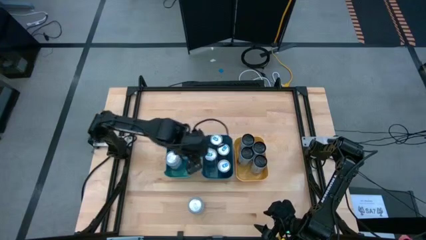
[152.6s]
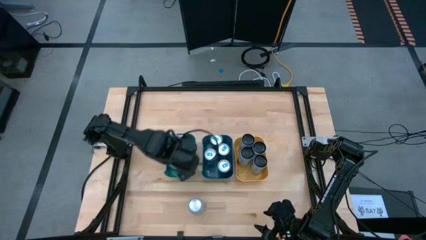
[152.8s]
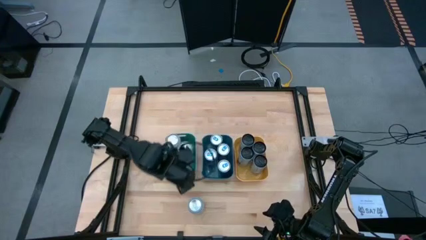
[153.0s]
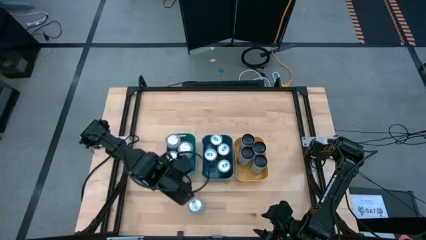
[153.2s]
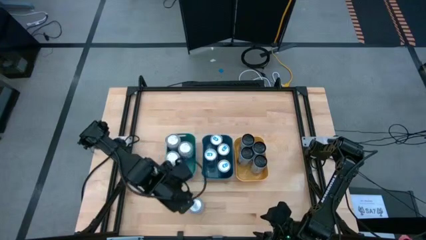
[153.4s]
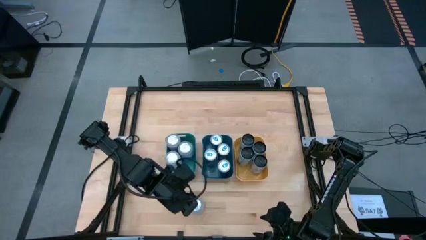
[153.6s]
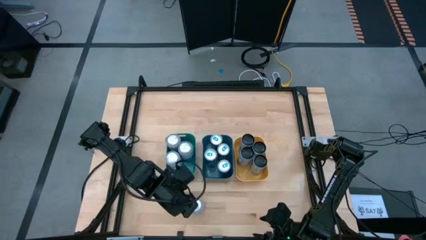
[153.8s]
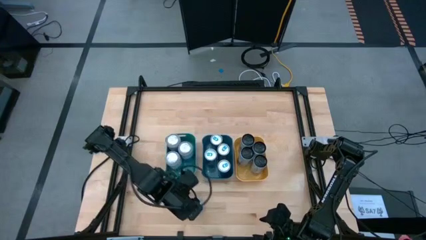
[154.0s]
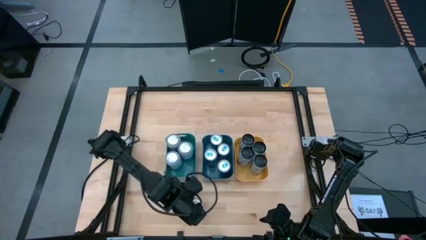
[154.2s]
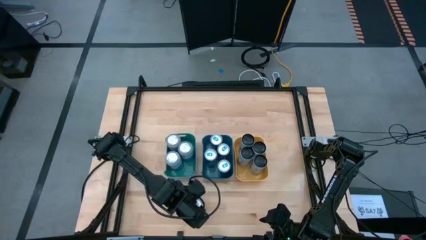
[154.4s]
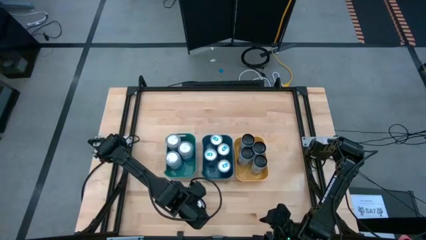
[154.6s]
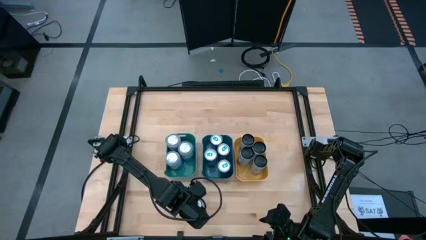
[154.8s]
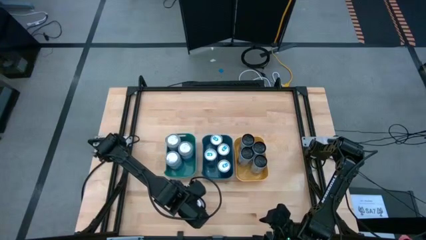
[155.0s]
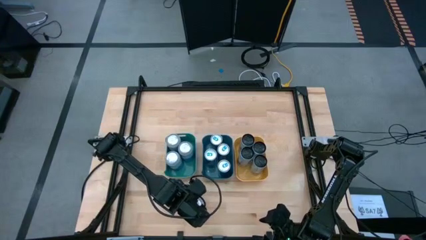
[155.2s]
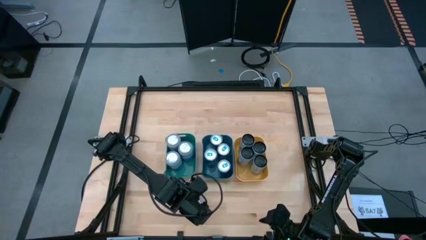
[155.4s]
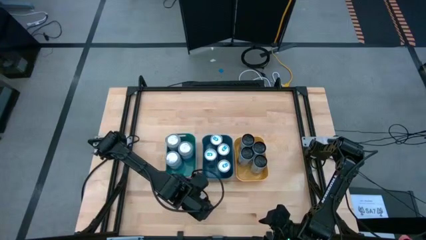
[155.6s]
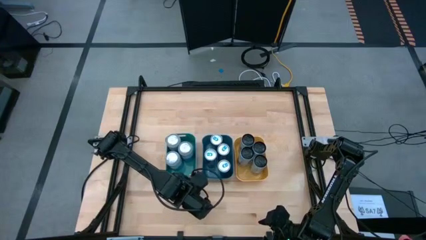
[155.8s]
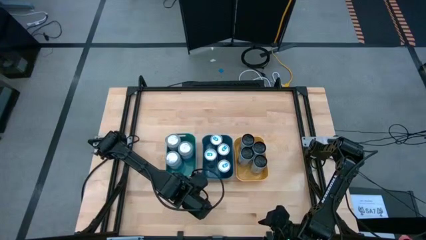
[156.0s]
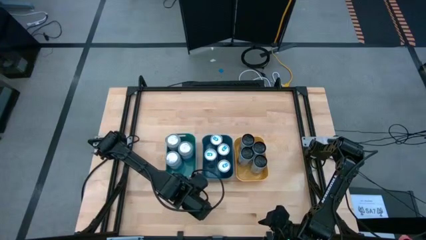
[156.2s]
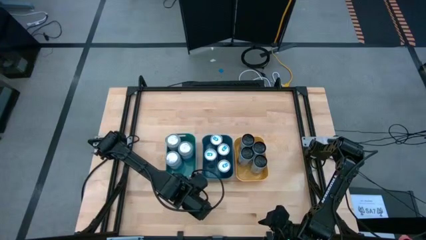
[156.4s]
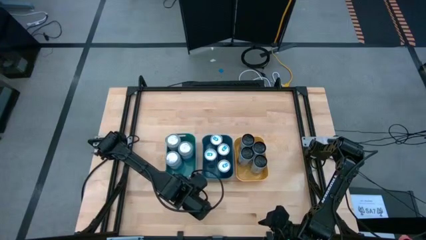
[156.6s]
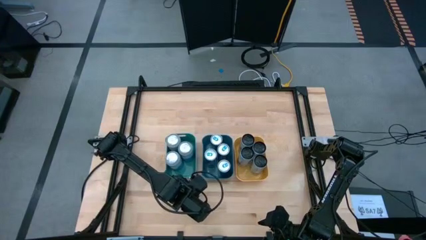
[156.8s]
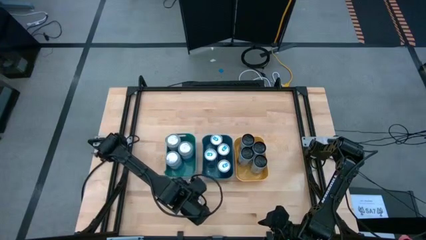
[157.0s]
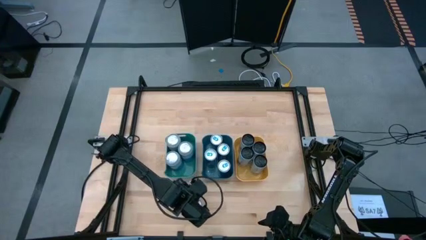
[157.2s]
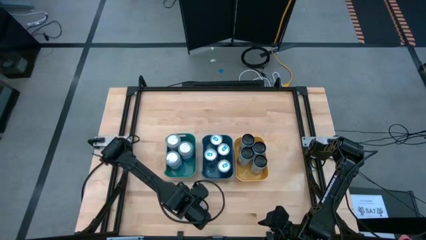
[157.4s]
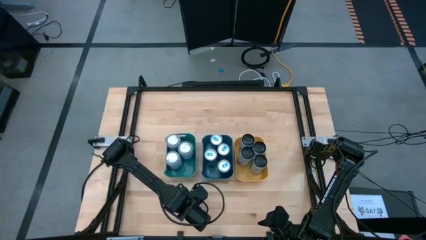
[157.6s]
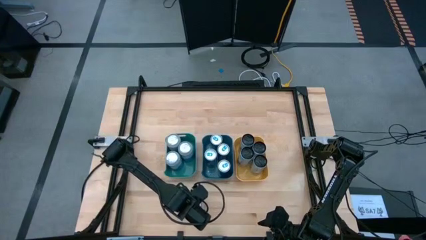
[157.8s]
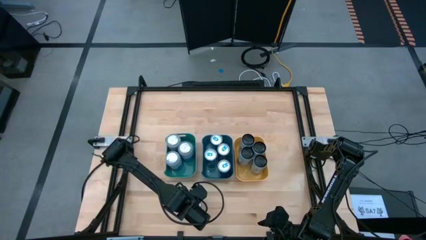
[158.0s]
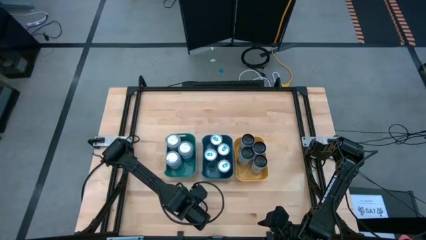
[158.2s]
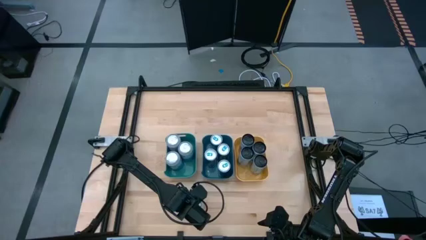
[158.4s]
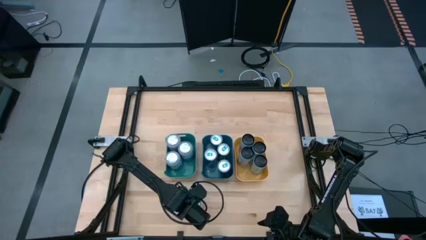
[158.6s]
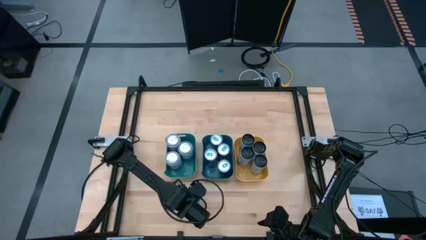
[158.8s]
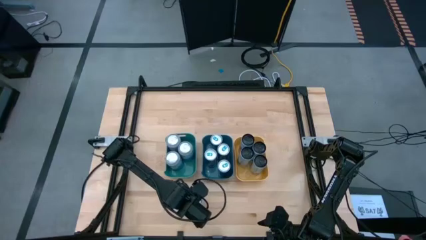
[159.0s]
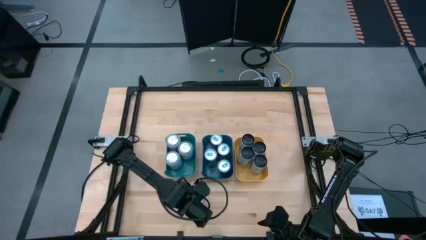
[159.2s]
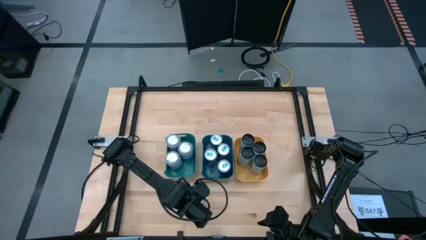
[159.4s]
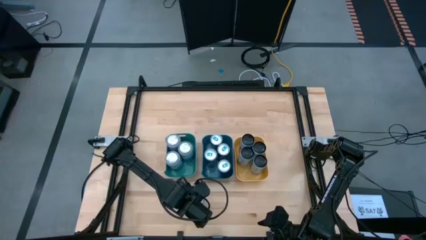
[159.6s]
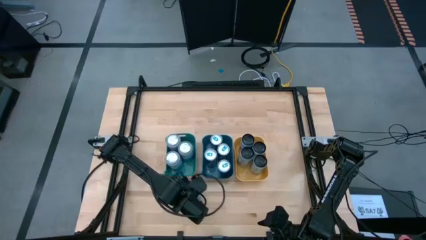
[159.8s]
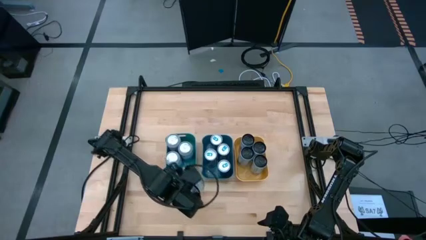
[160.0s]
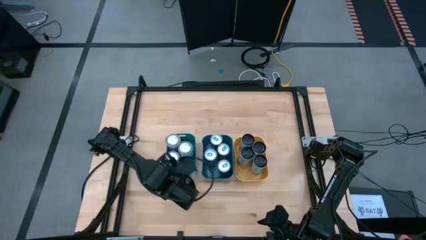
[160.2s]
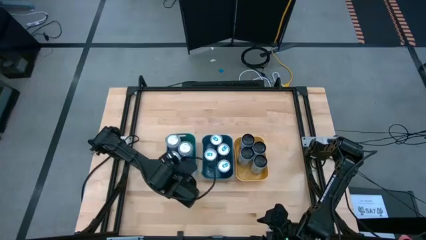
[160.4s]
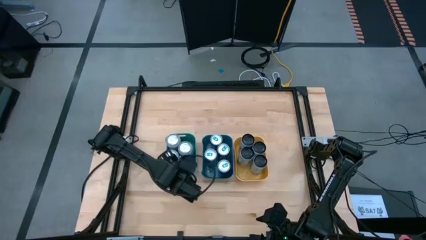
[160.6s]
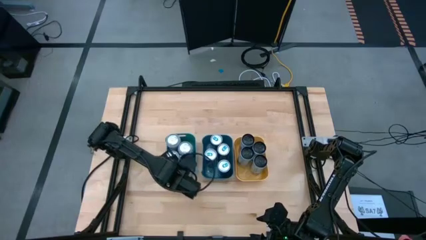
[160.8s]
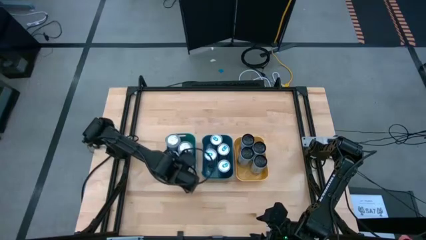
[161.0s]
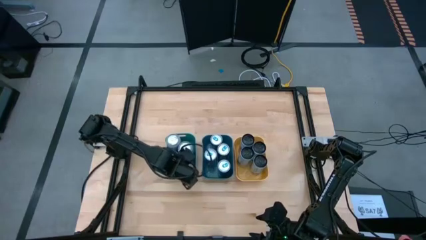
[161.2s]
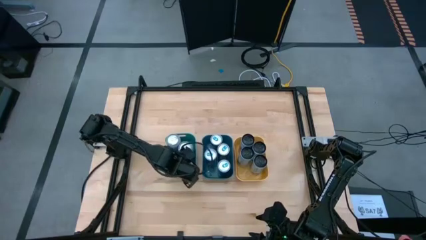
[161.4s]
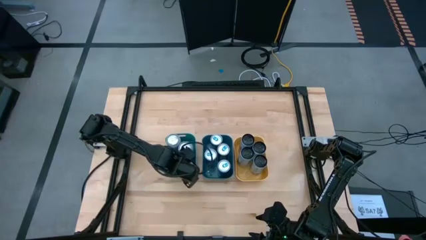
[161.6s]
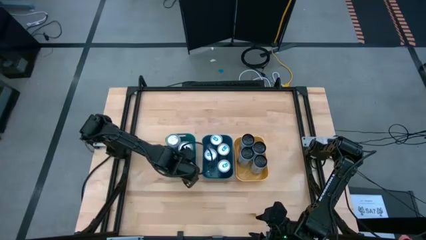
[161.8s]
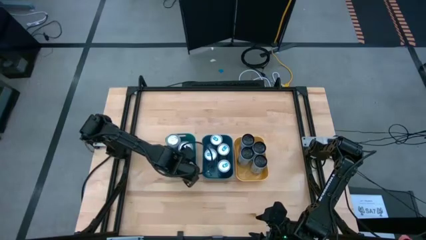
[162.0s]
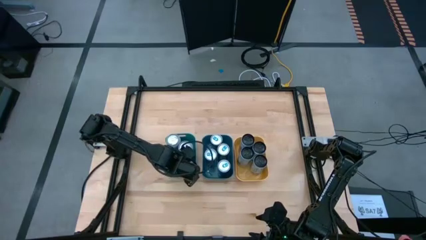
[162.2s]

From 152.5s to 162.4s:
Task: Sort soda cans
Put the blue-white soda can into the green bin

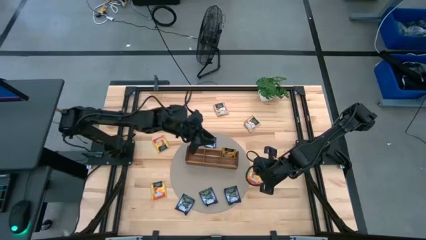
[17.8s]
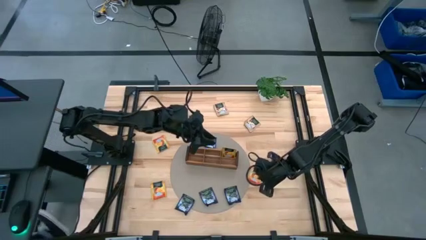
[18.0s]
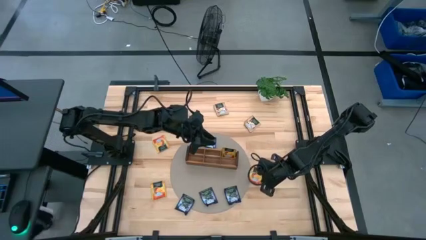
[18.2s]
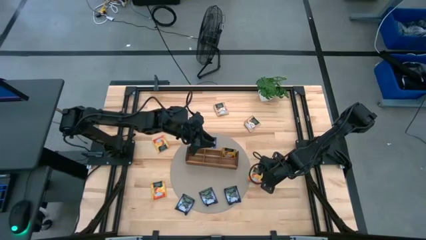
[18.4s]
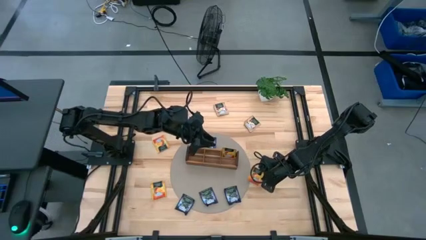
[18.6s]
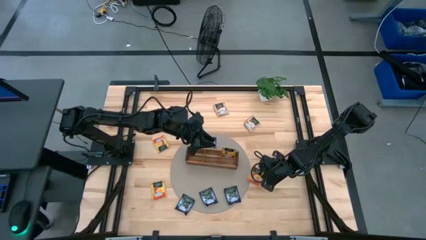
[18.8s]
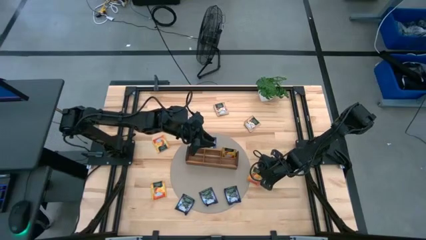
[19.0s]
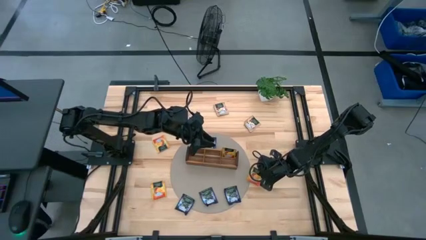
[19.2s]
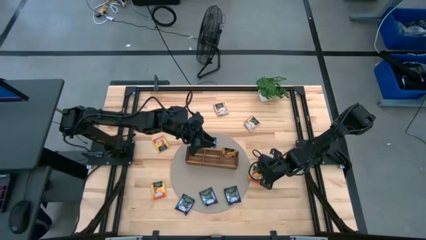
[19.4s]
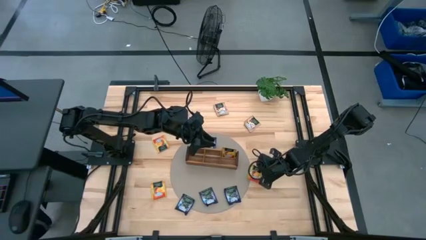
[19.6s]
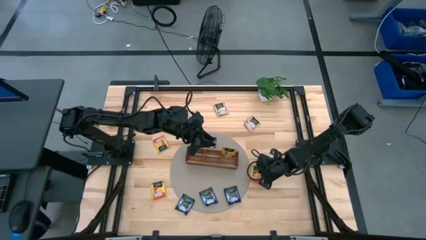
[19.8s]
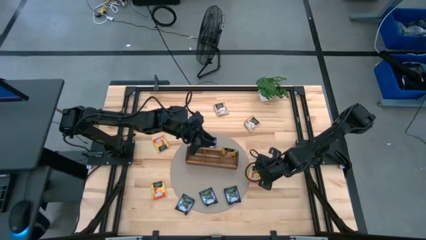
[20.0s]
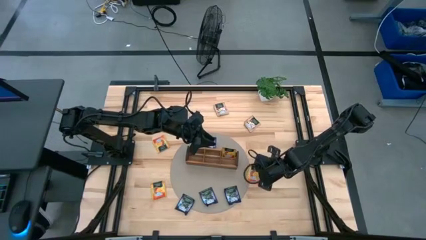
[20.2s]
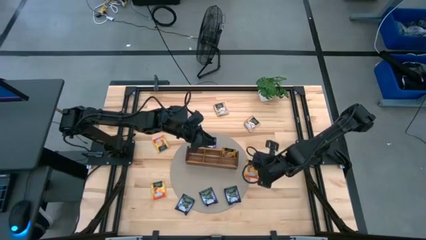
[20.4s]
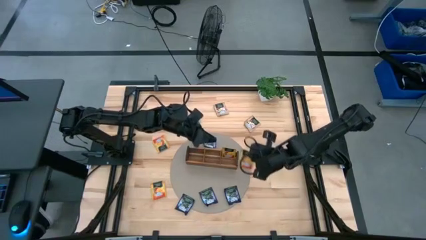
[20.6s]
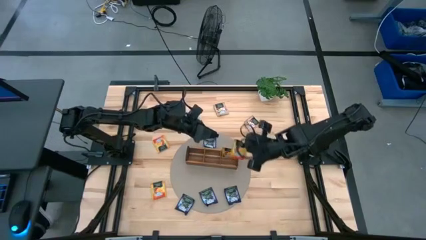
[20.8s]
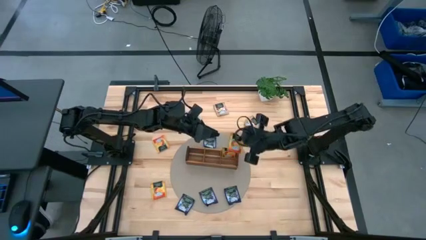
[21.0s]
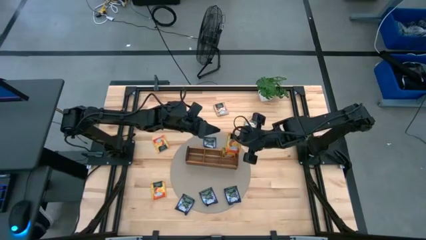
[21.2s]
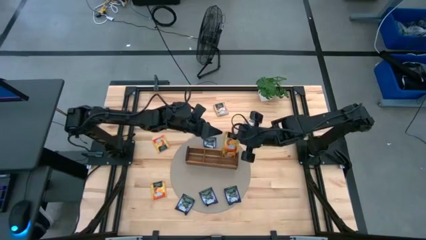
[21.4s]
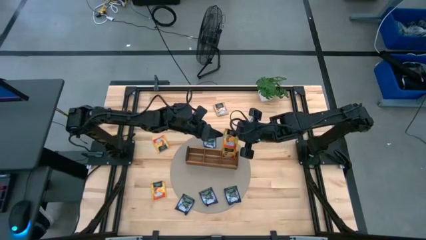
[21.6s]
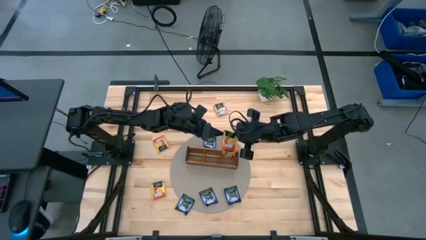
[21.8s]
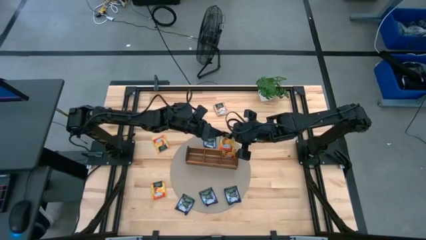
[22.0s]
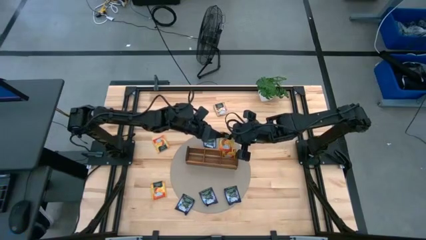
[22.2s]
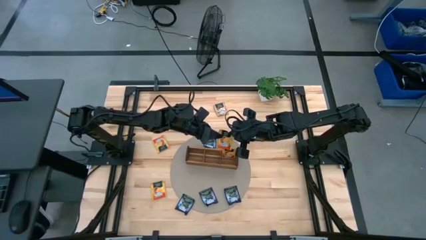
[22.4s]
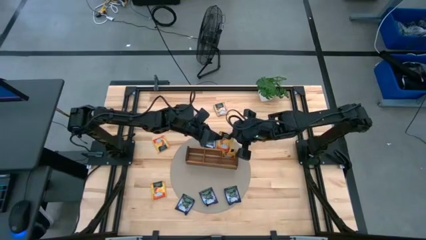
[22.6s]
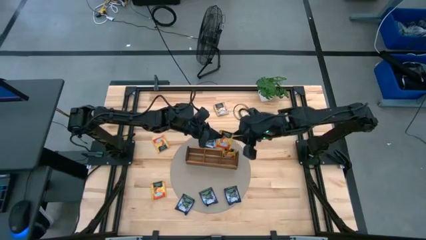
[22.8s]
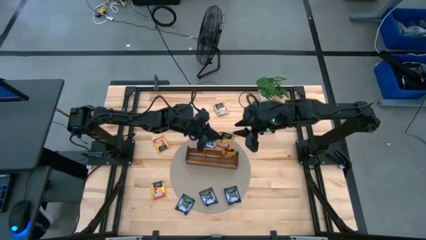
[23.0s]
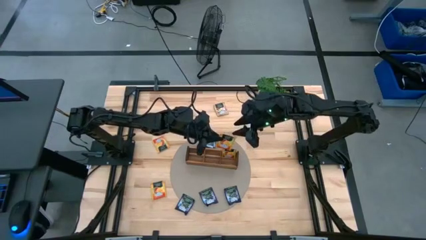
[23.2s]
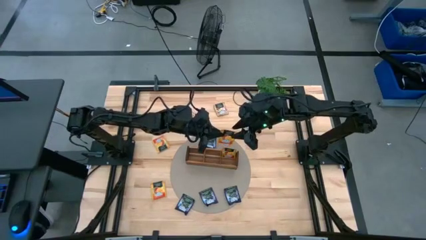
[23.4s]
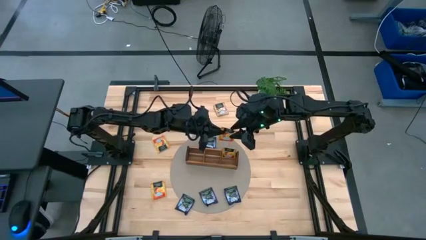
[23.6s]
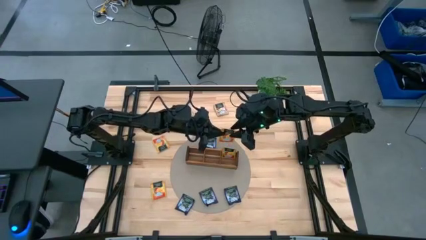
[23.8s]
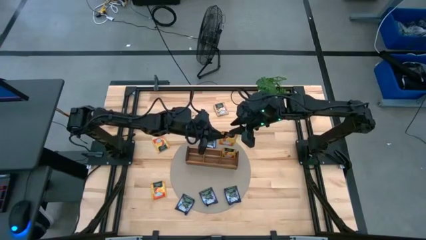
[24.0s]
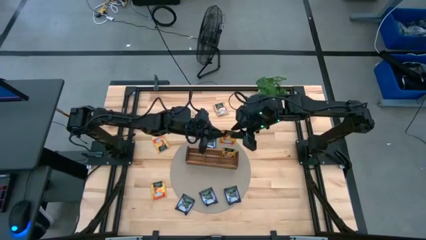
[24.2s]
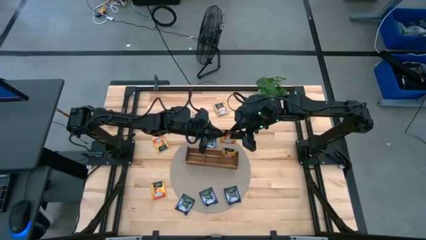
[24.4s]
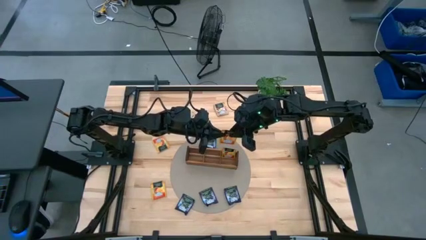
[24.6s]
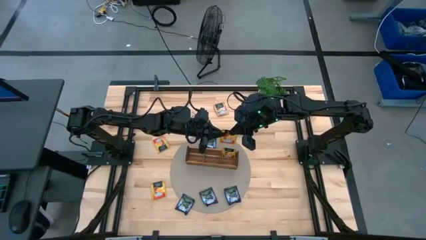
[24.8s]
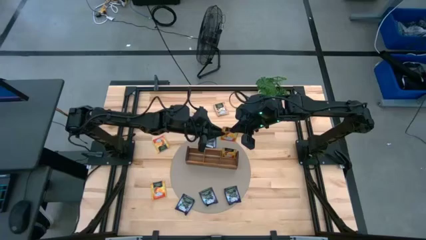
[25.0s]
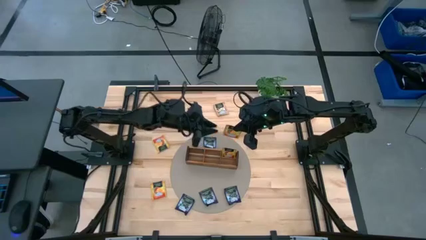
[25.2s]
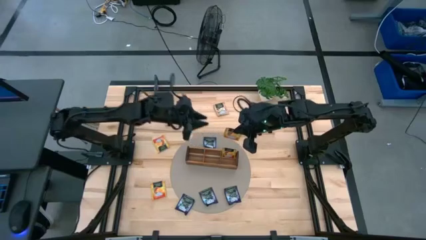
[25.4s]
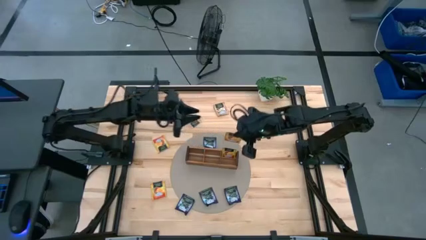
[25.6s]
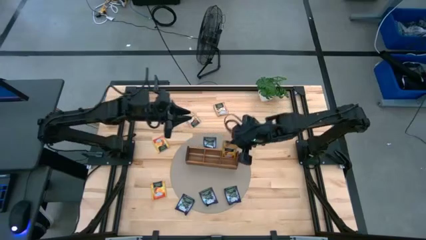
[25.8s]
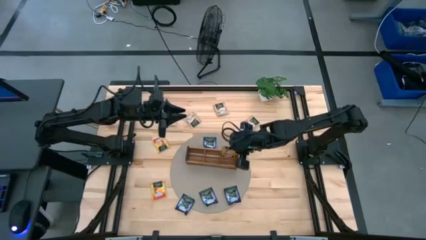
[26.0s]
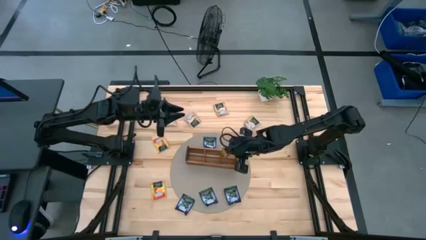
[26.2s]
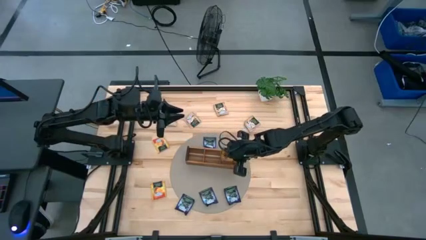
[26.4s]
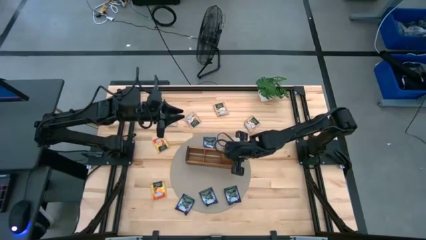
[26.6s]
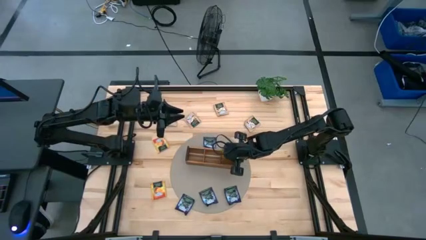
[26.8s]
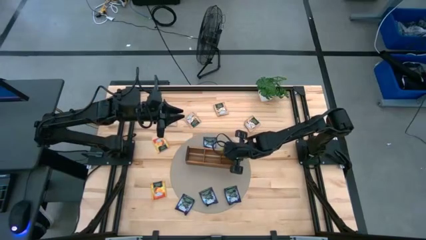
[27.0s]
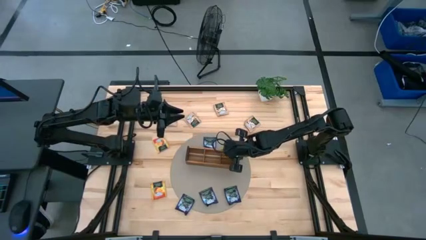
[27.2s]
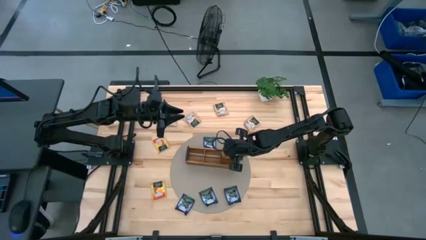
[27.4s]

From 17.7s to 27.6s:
Task: Pick & Place Tea
Put the yellow tea bag into the right section of the wooden organizer
